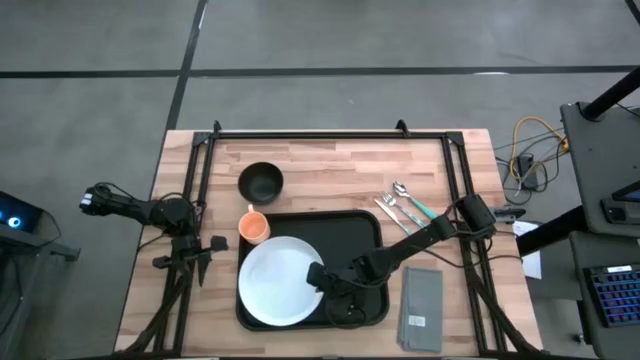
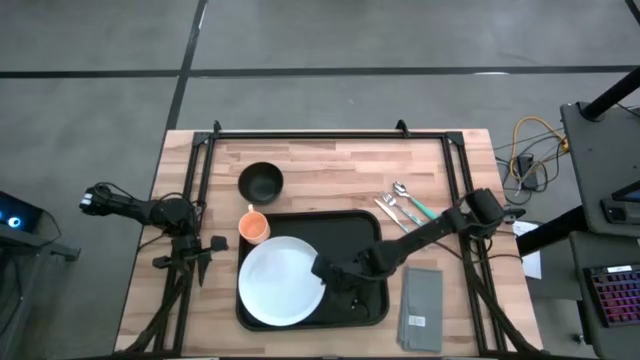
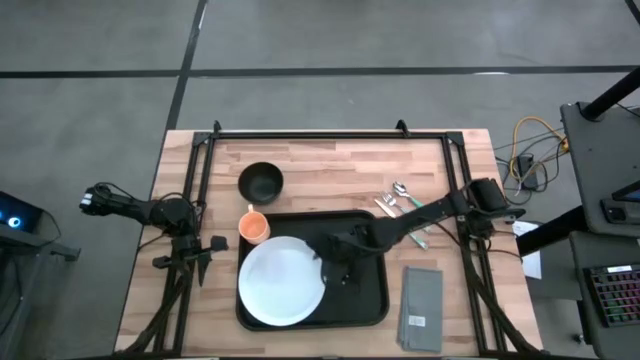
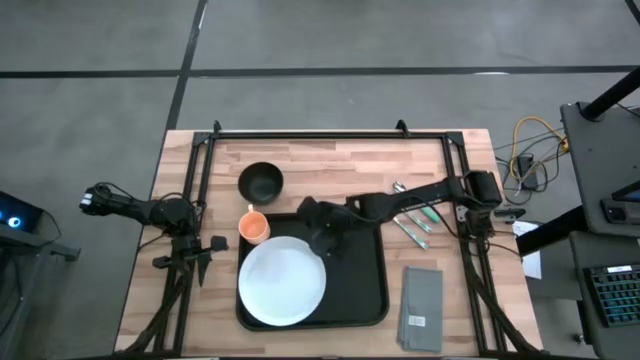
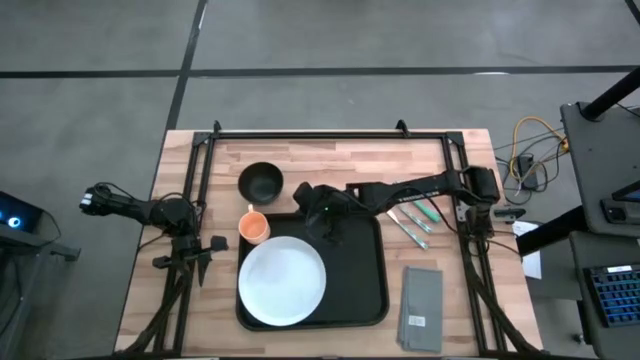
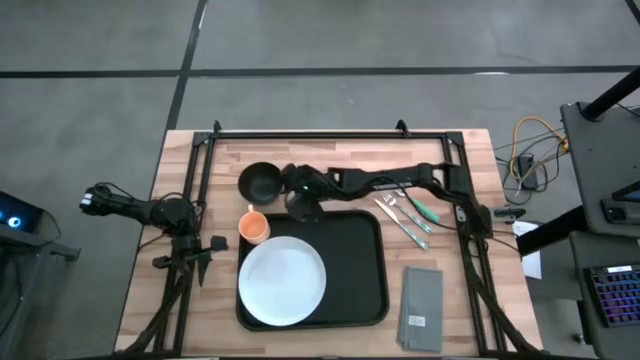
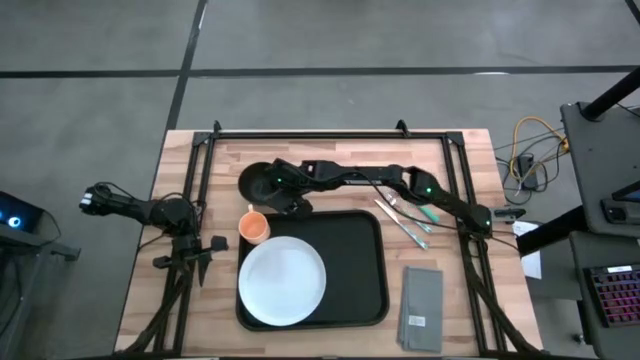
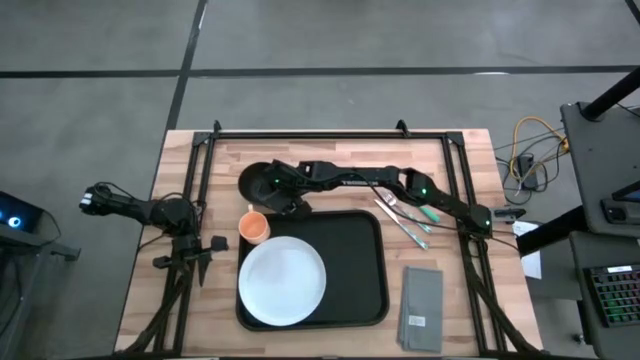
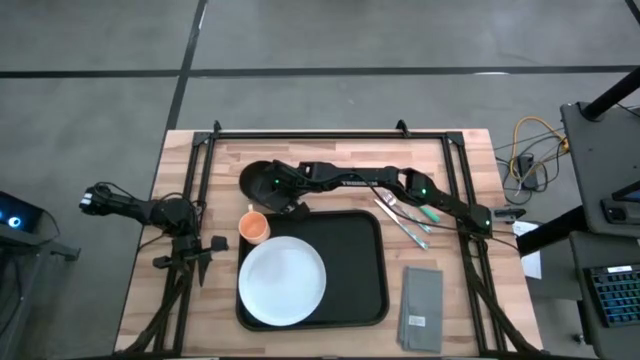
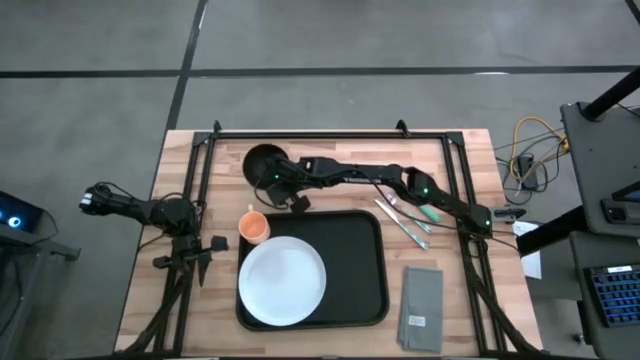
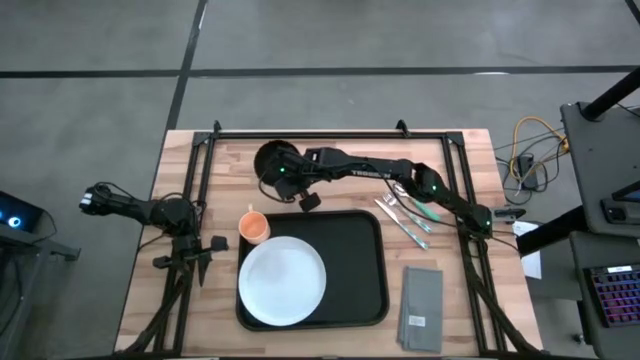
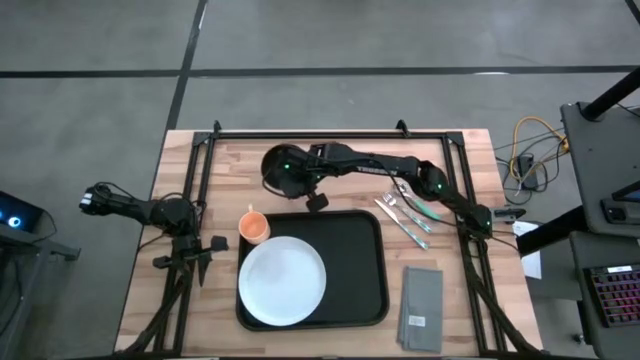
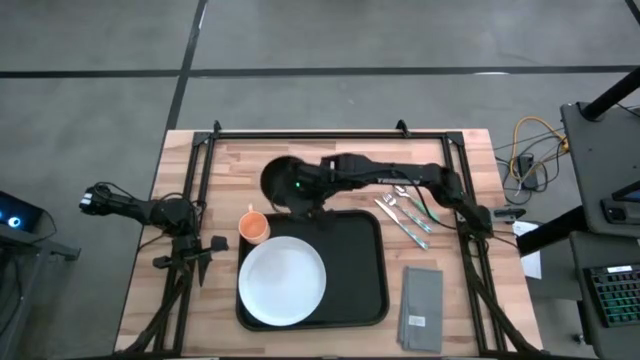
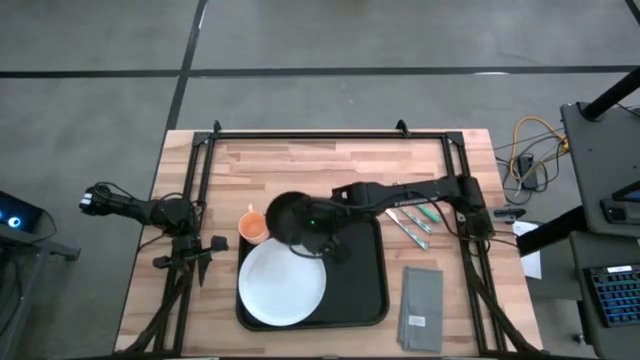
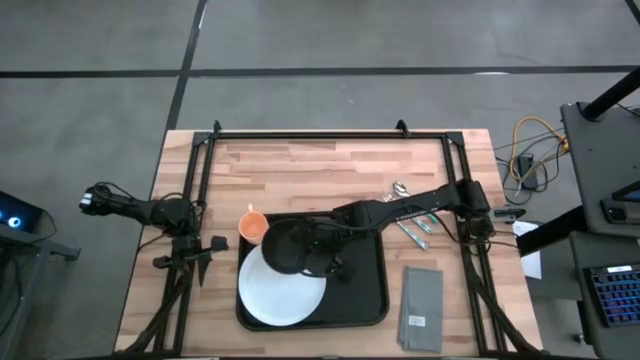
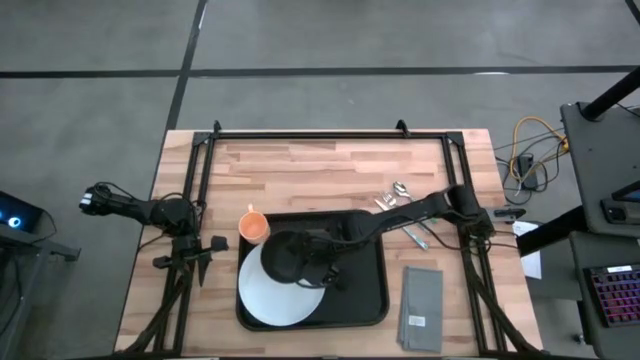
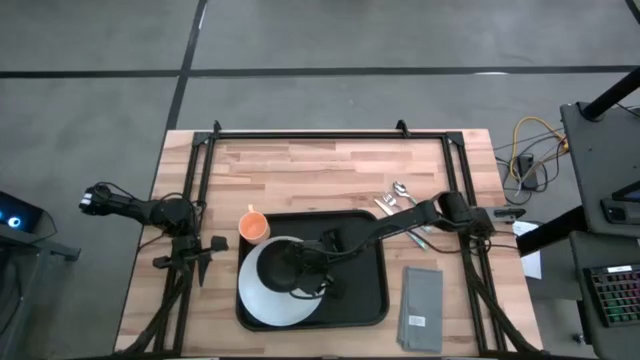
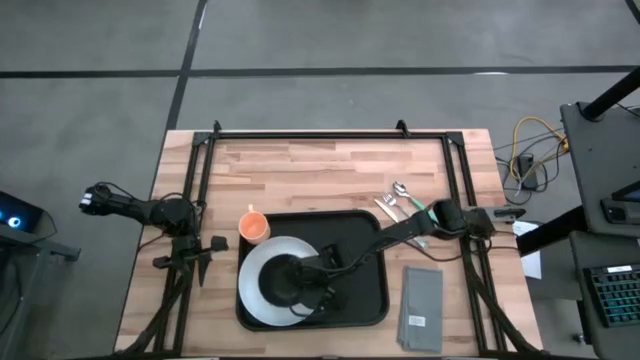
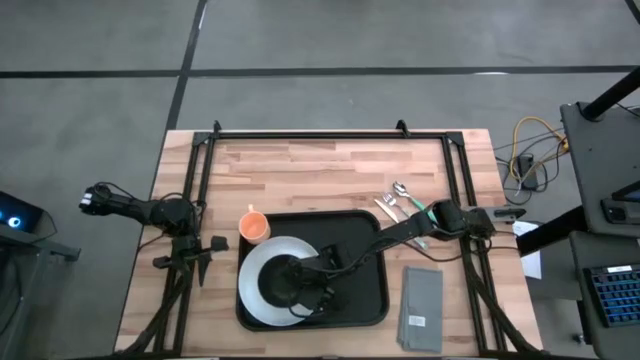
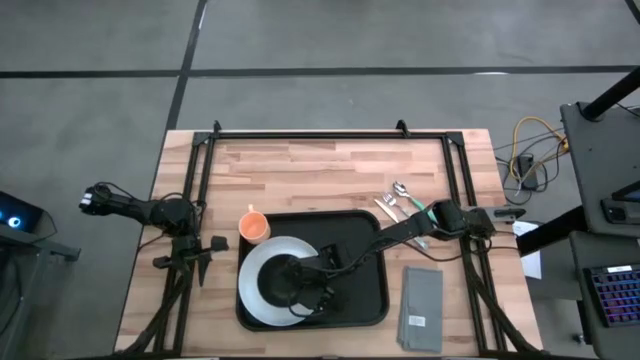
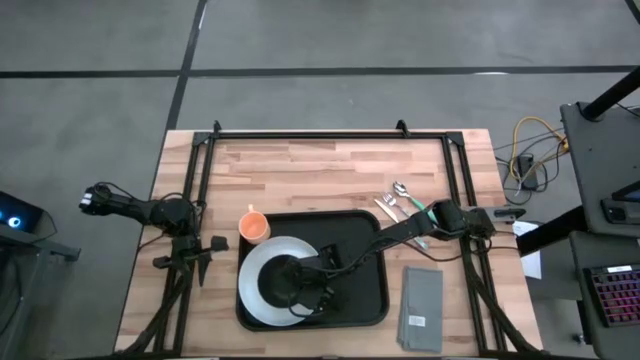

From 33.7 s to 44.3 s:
Task: Set up tray
Put the black bowl on top of the white plate on the black table tray

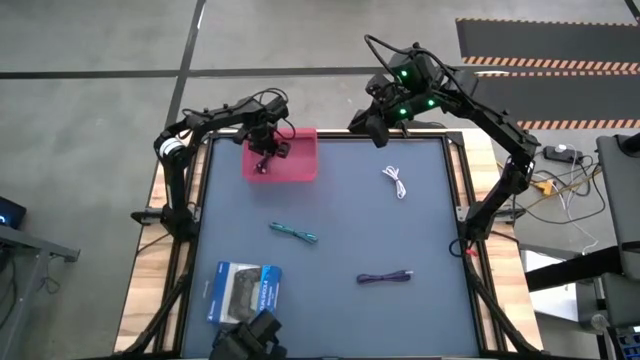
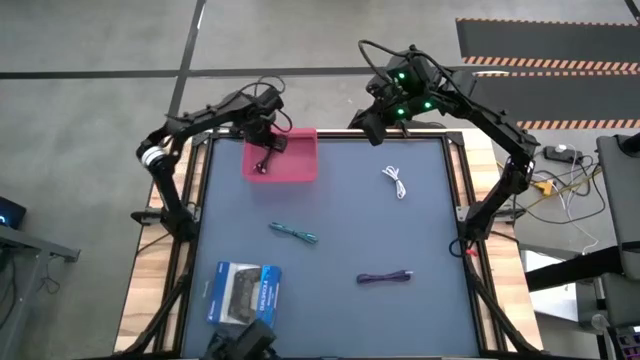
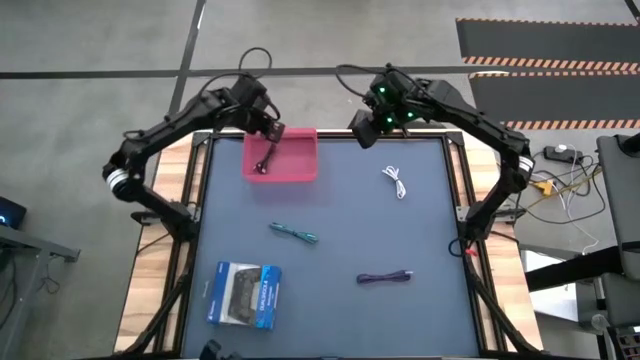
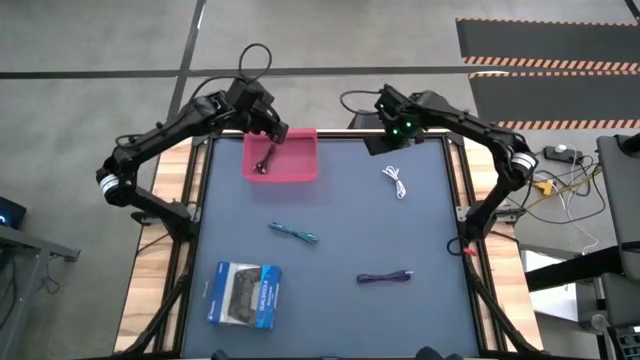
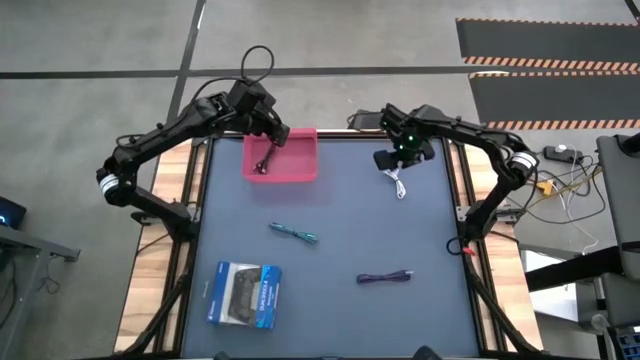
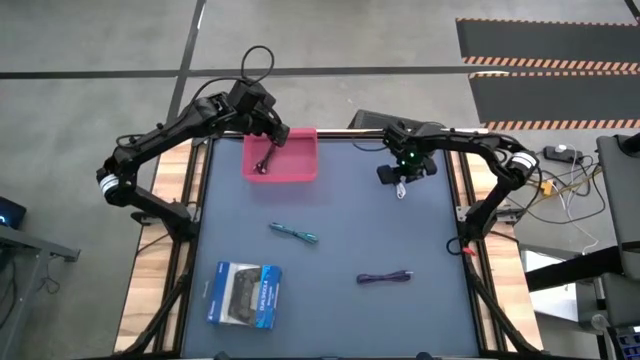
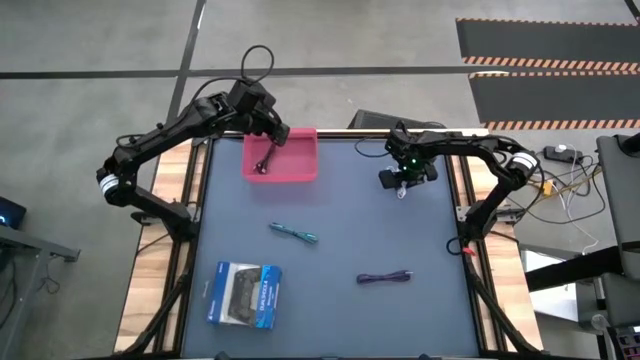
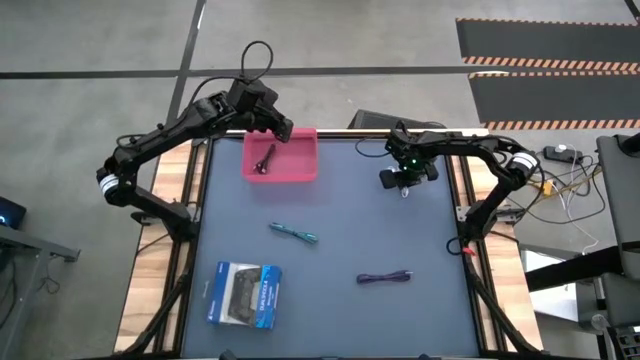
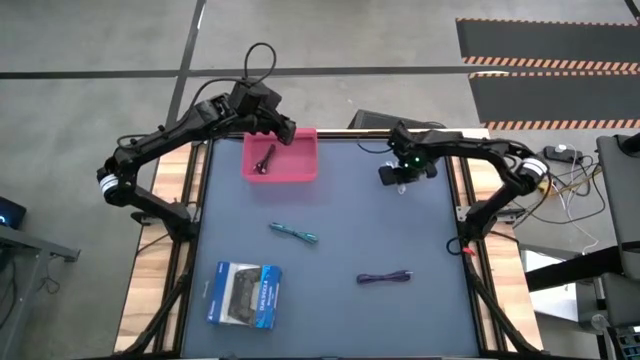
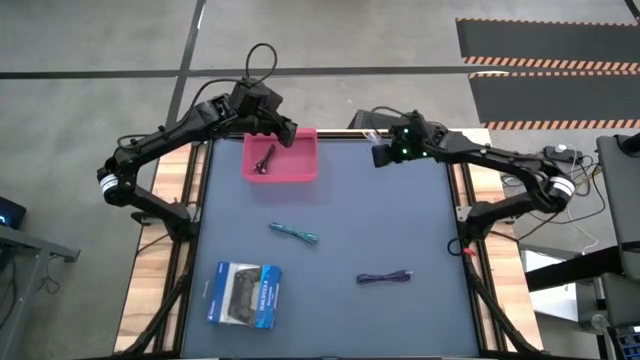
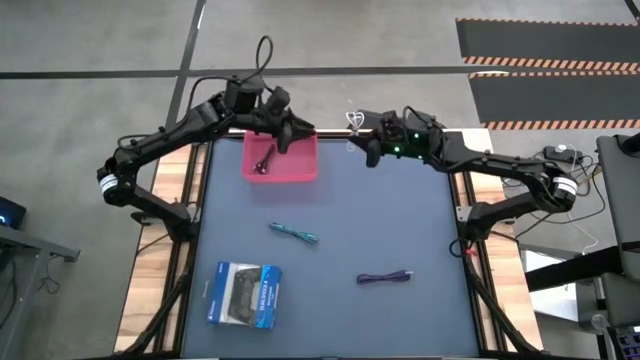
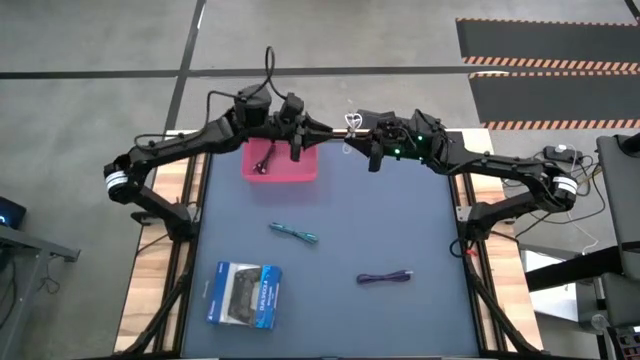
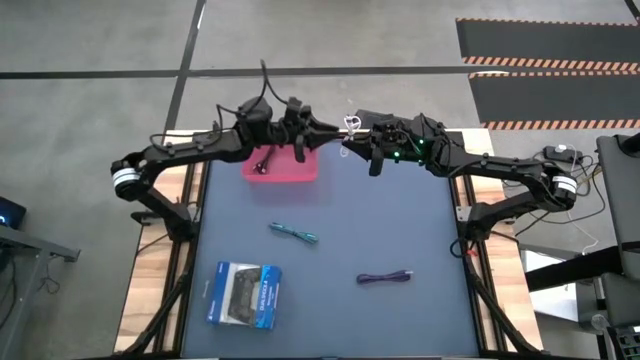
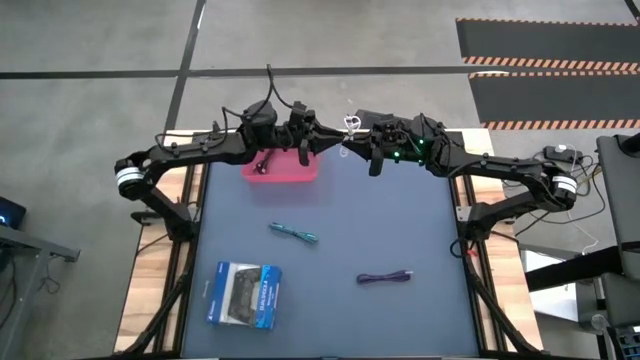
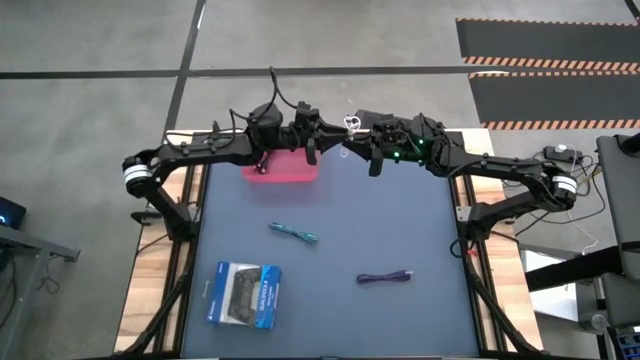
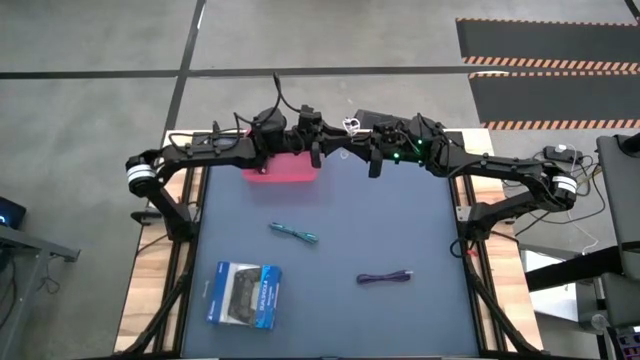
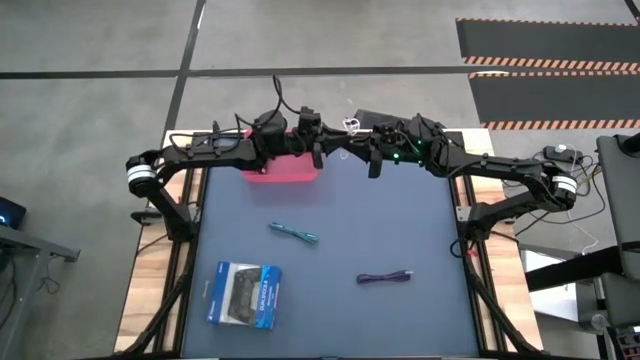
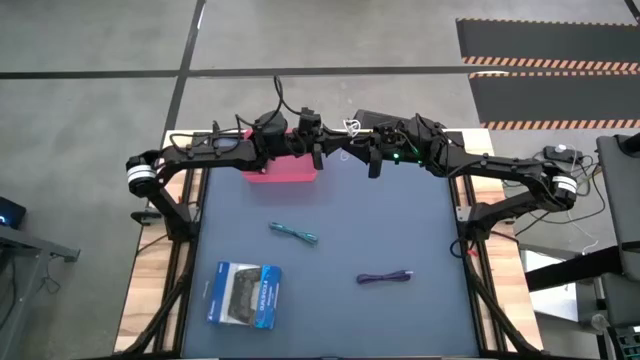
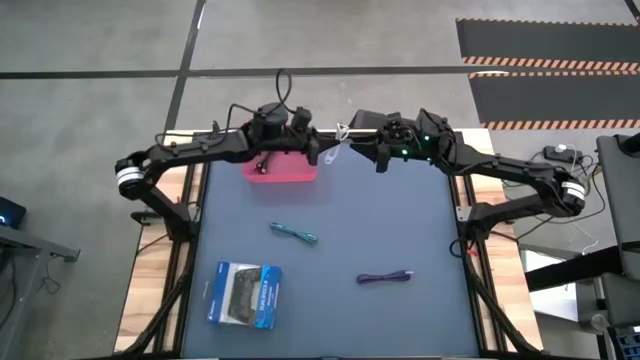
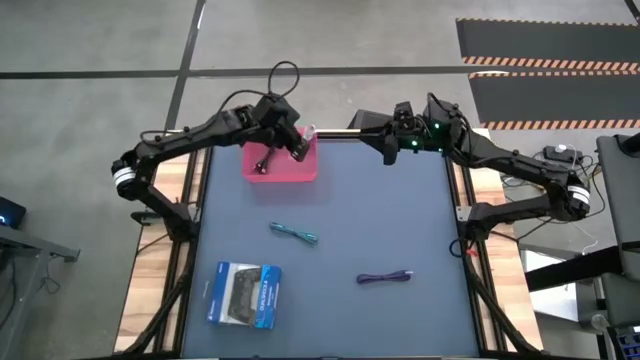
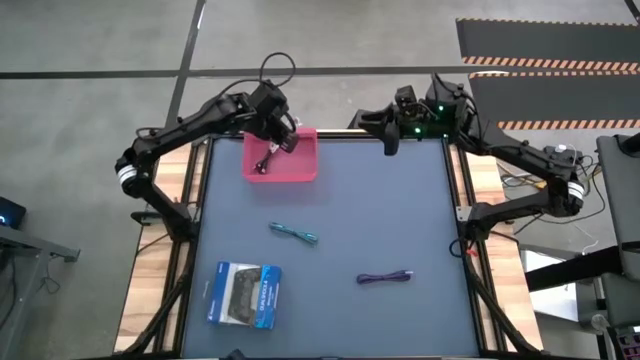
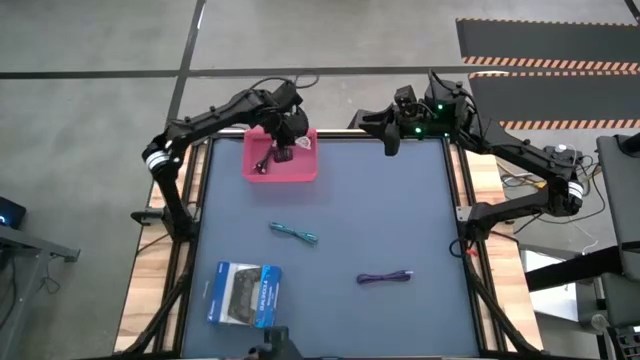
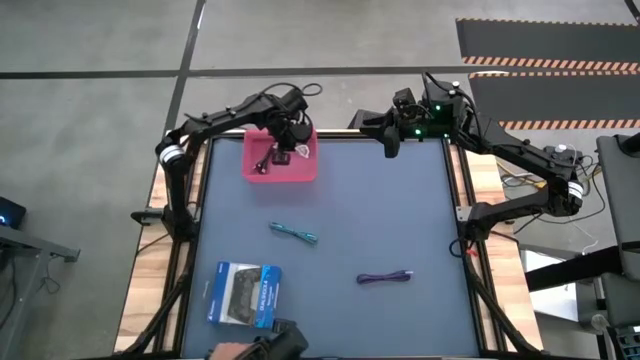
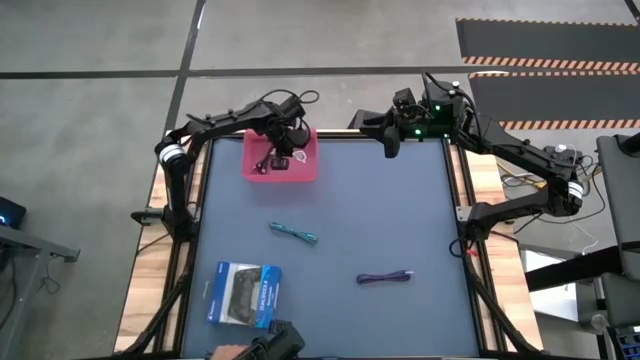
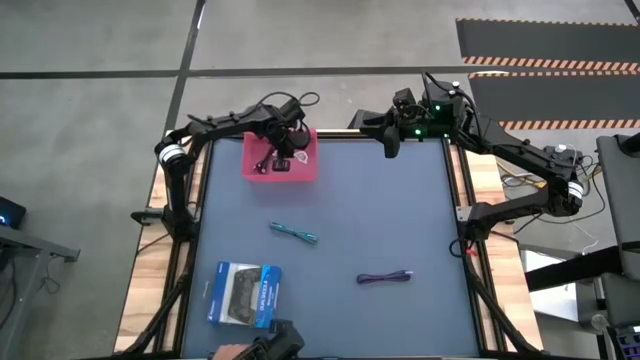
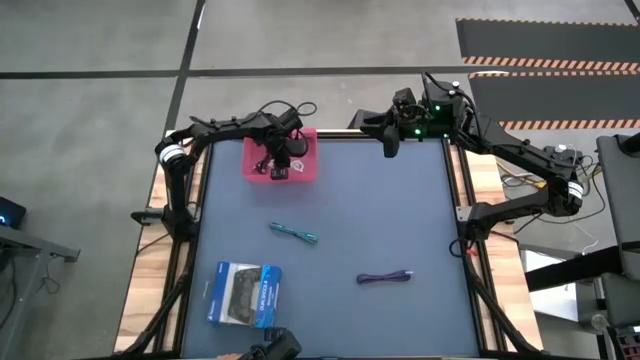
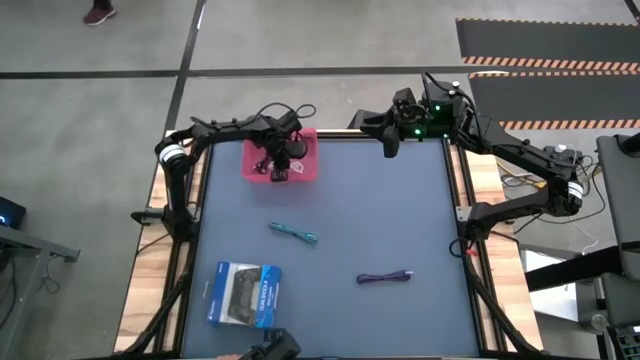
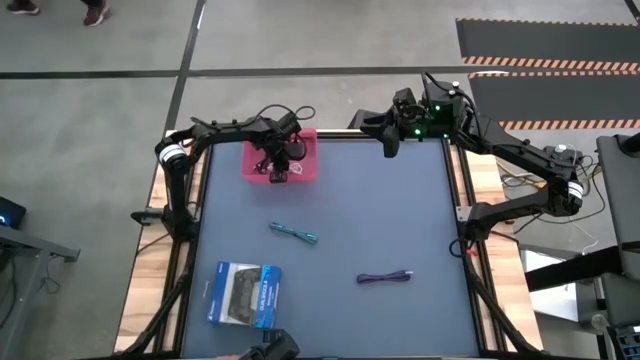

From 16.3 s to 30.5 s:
Task: Pick and place USB-C Cables
Put the white charger cable into the pink bin
